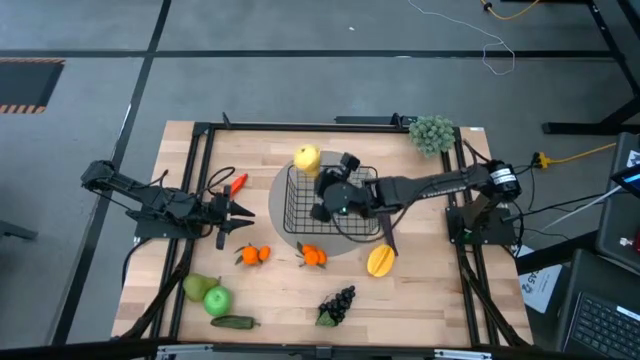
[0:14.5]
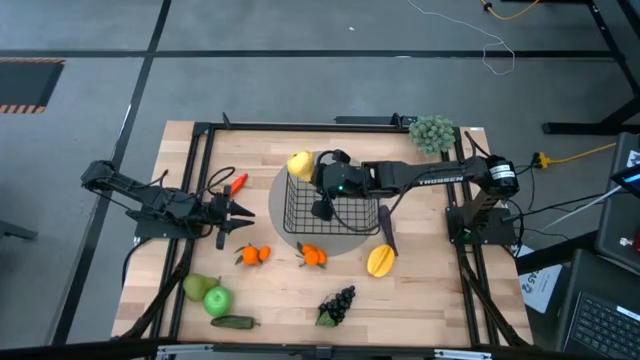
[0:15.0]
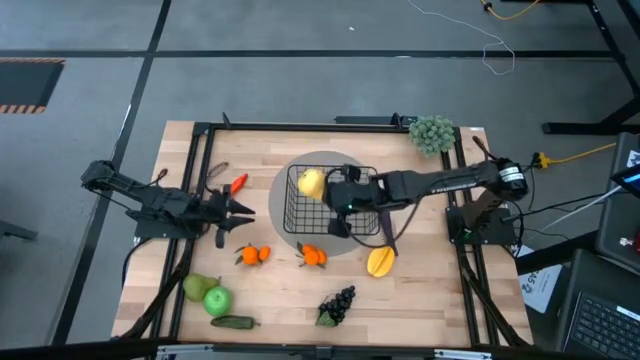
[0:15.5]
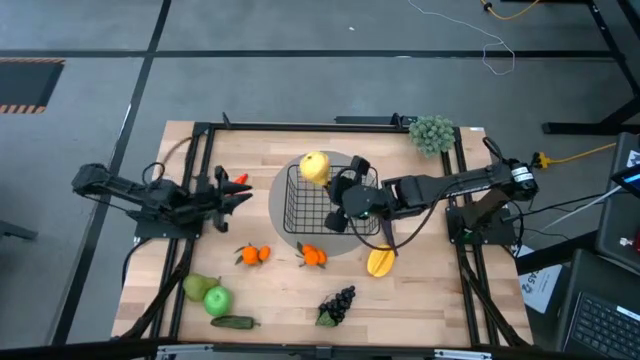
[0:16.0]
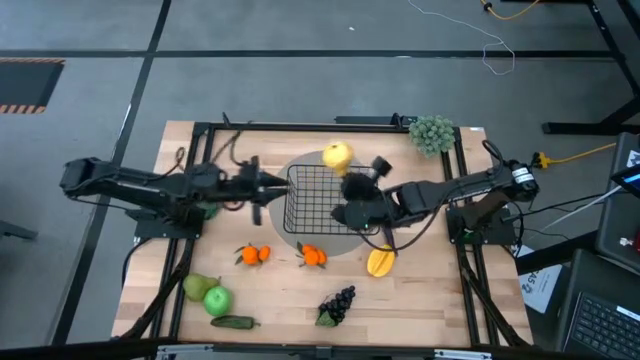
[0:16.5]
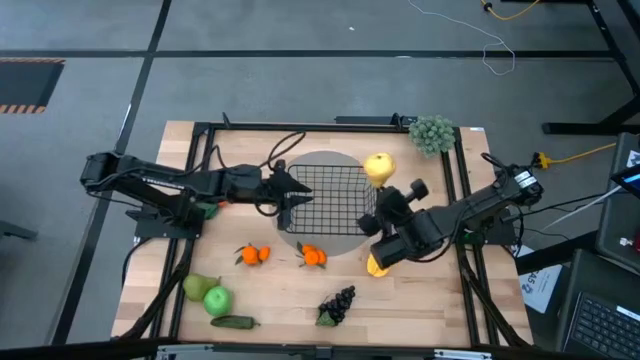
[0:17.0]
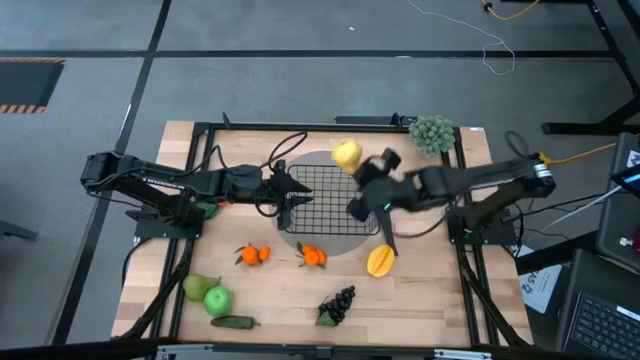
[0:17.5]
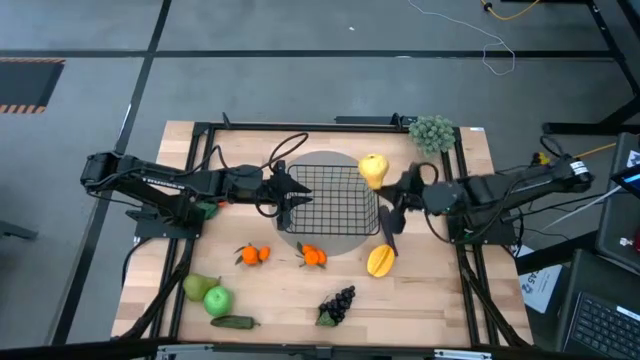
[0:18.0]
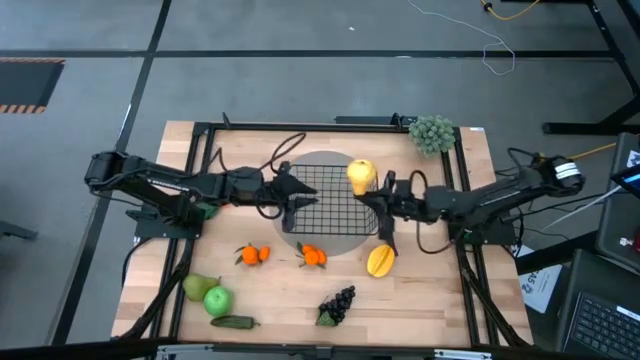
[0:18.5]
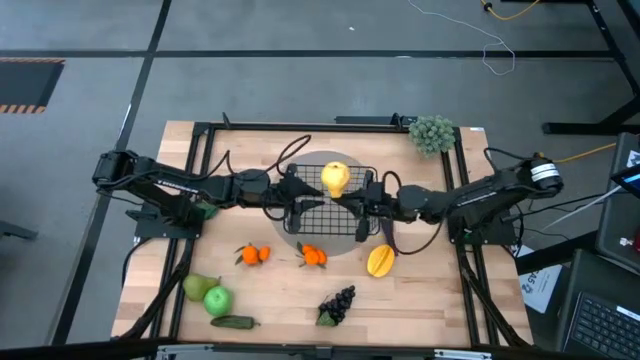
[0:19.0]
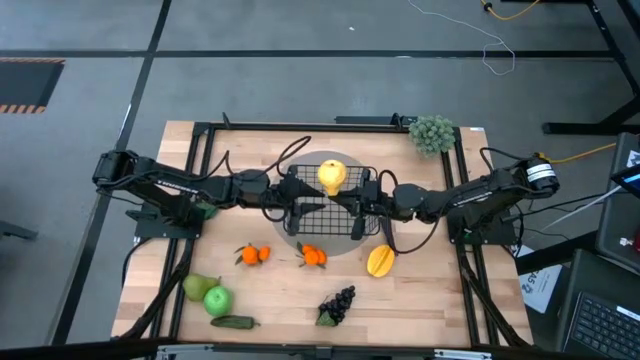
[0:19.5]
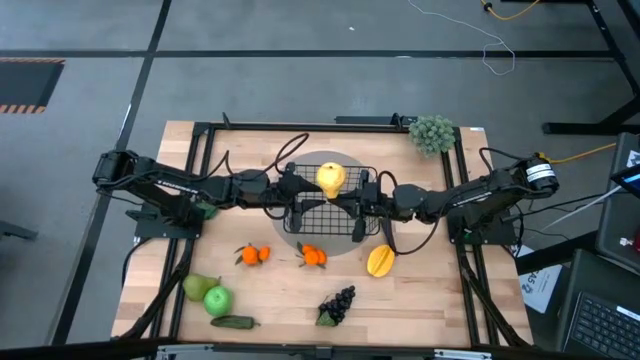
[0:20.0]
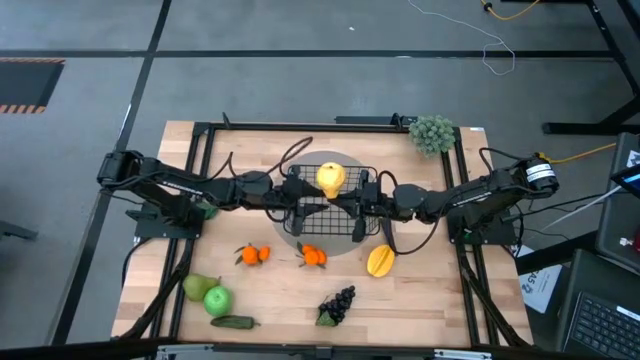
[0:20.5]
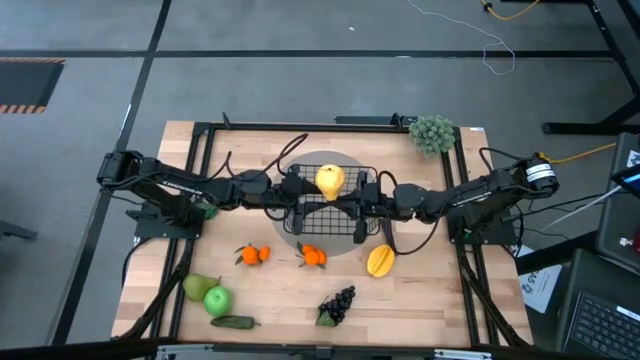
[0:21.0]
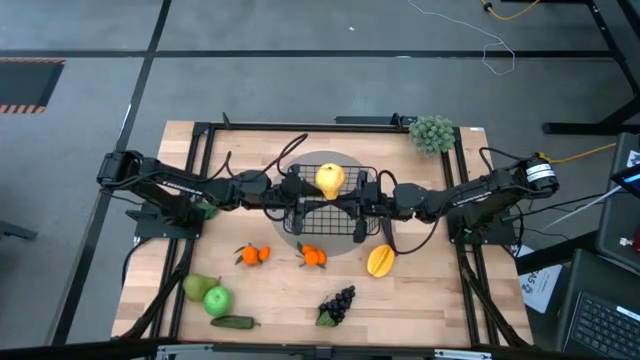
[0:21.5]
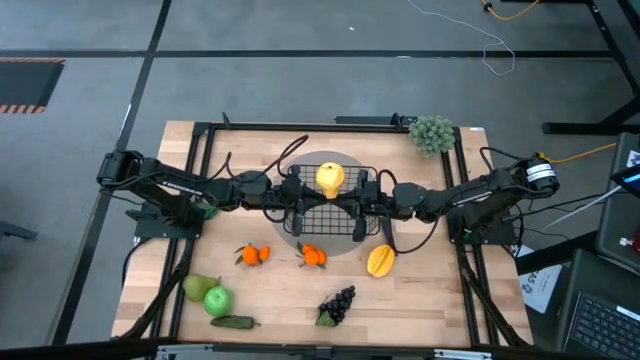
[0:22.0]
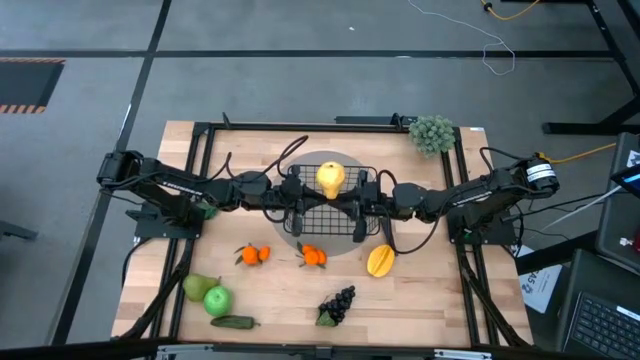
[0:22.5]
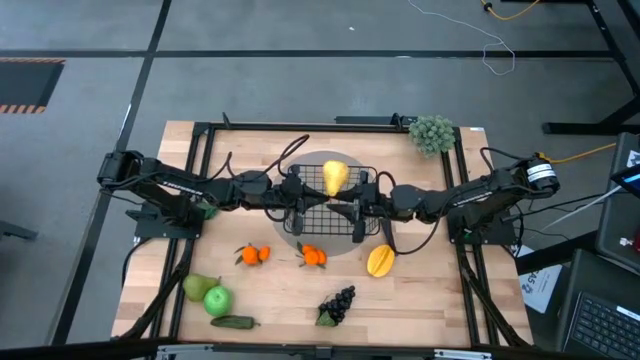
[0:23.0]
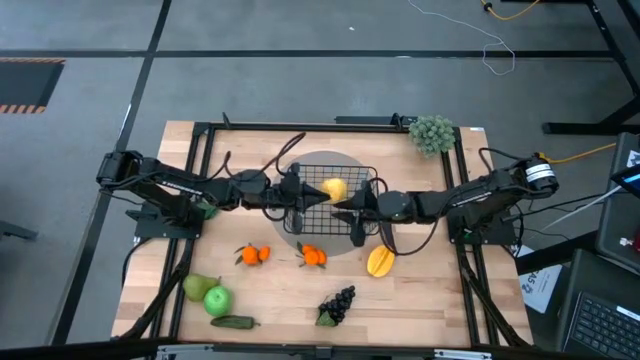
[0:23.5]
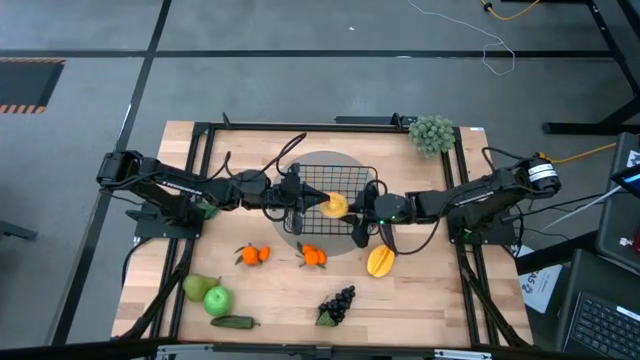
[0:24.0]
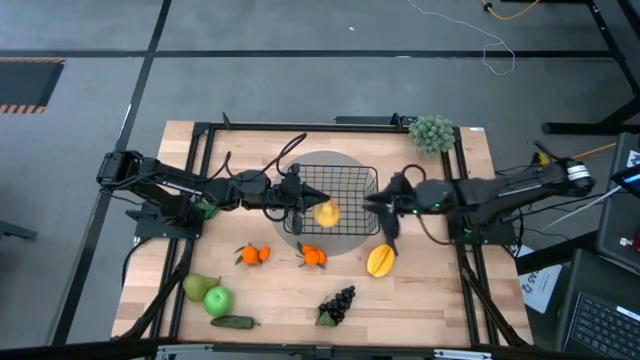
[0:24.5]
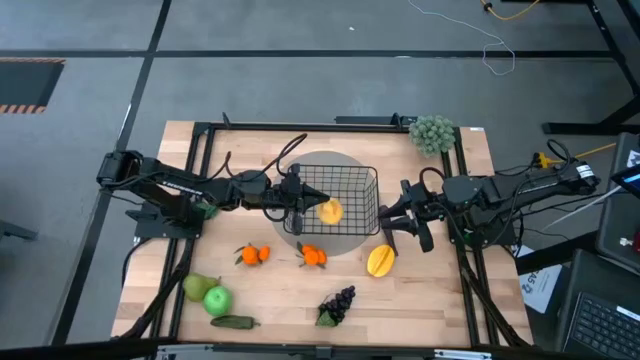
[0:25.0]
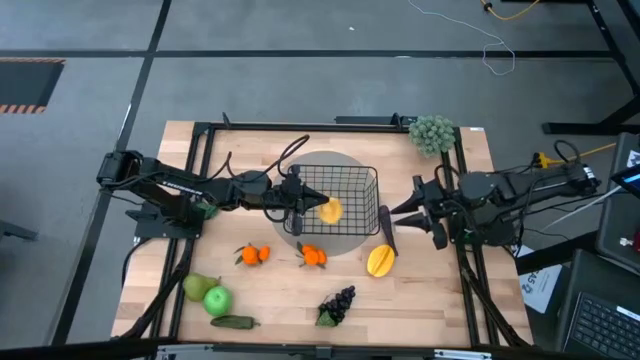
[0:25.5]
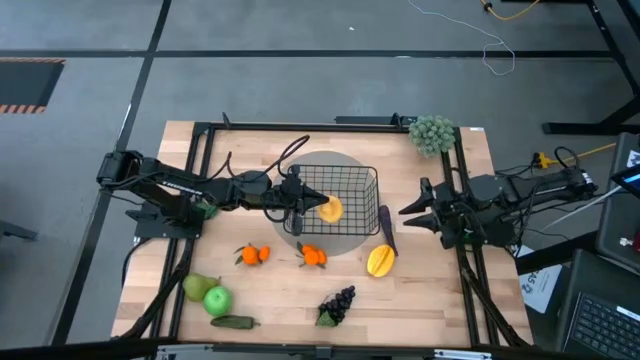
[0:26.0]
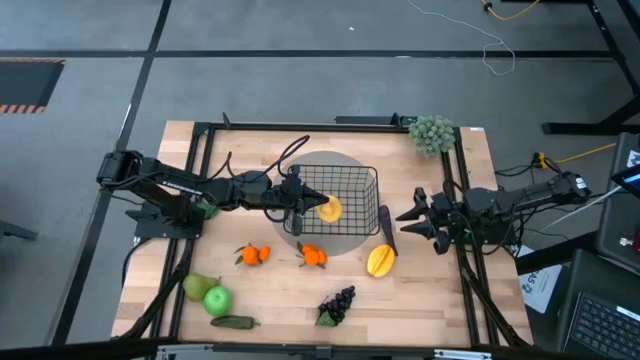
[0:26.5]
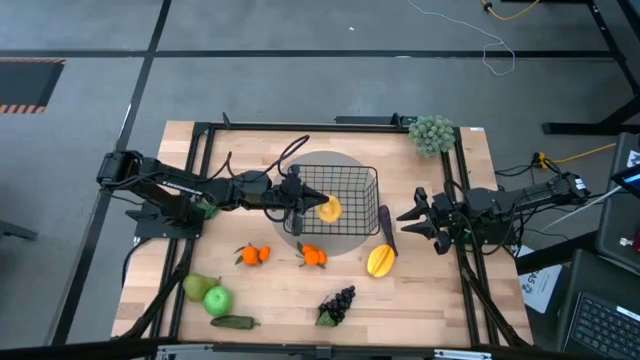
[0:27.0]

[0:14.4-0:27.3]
Task: Build produce basket
Put the yellow pear into the wire basket

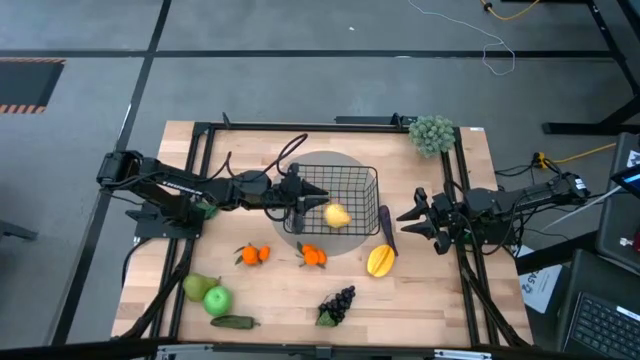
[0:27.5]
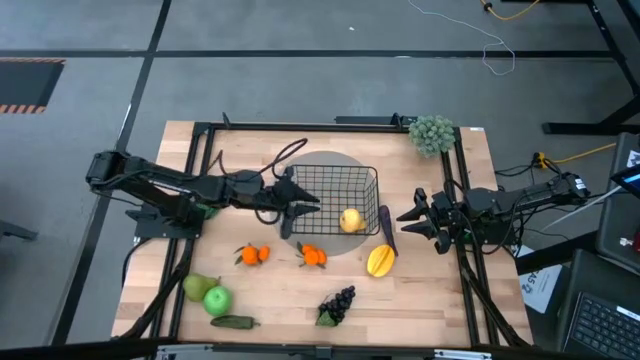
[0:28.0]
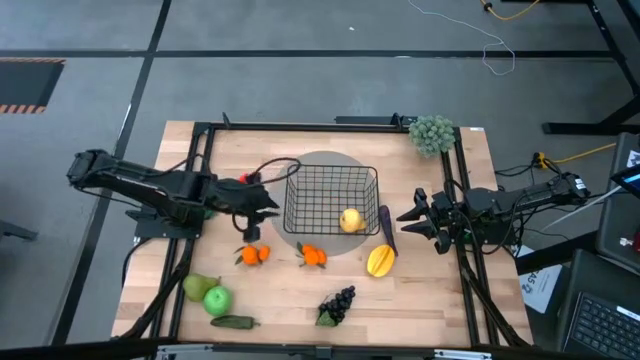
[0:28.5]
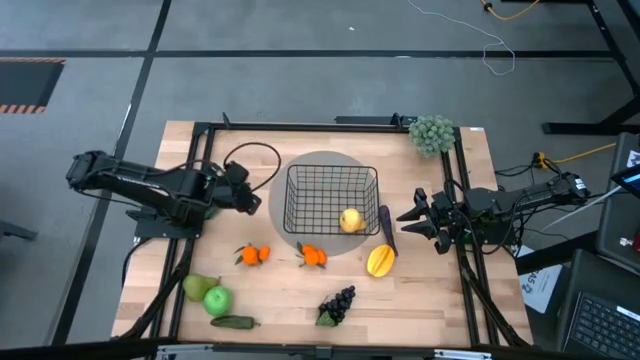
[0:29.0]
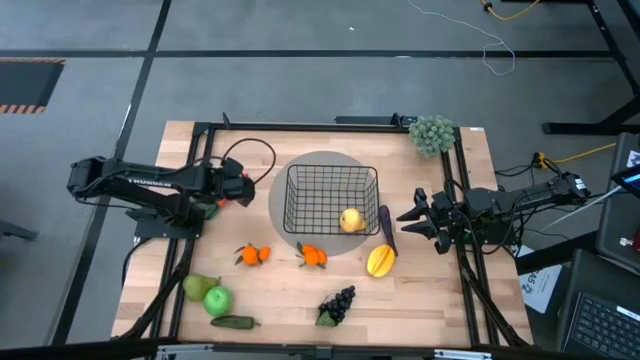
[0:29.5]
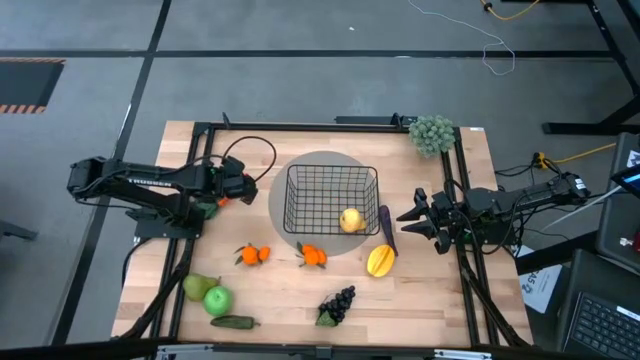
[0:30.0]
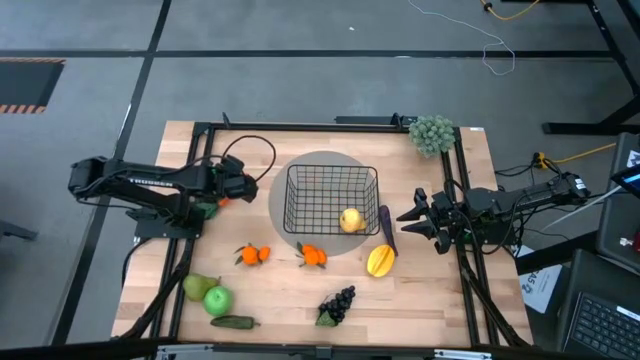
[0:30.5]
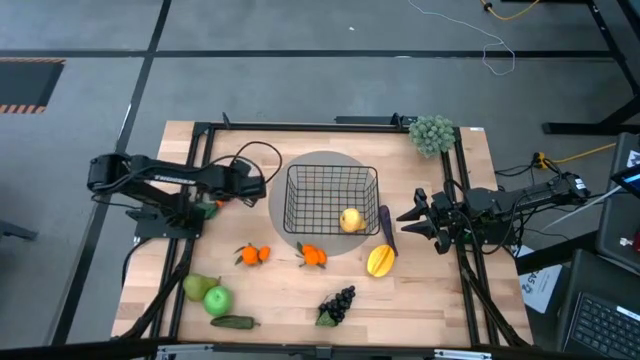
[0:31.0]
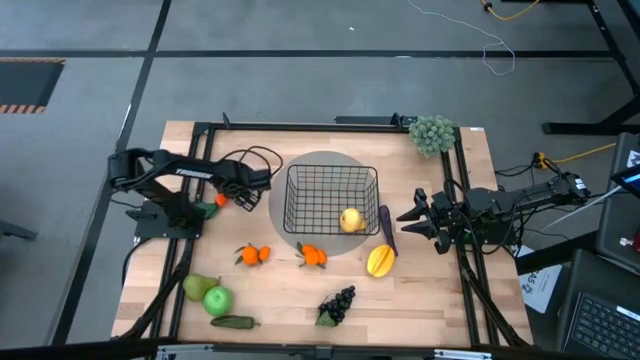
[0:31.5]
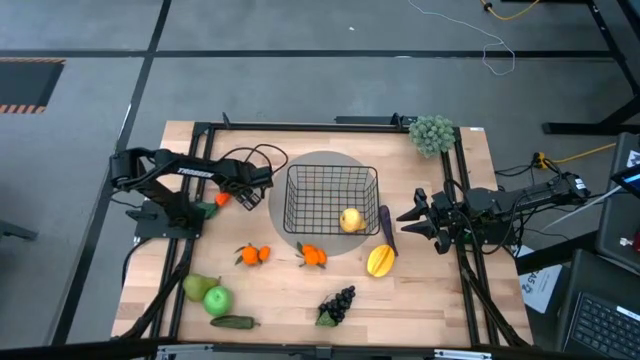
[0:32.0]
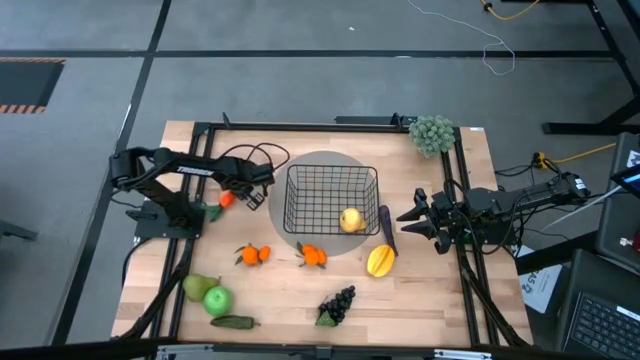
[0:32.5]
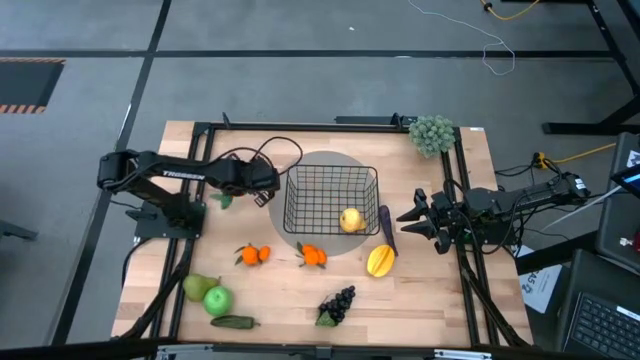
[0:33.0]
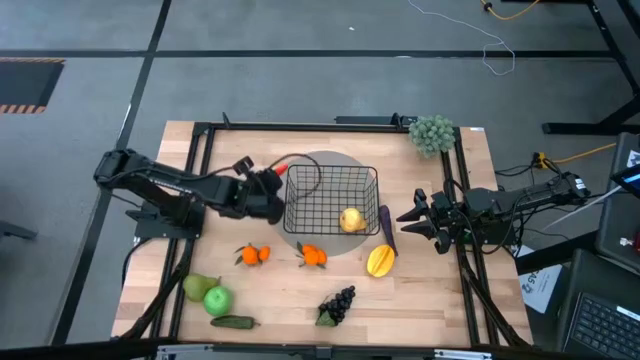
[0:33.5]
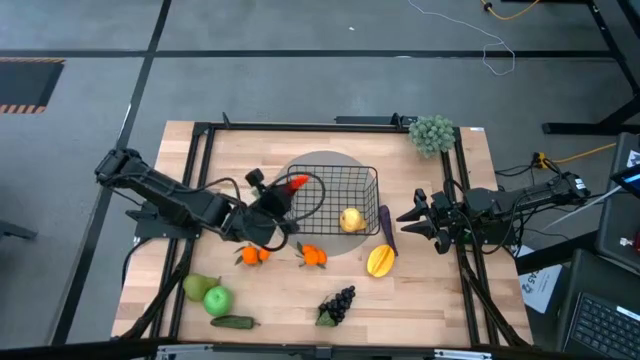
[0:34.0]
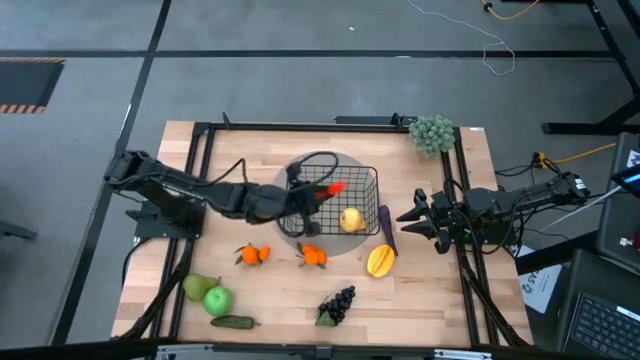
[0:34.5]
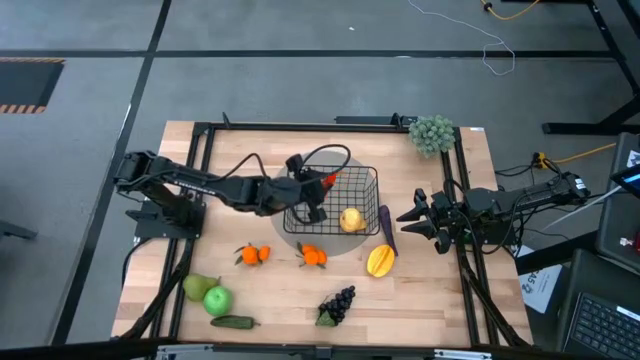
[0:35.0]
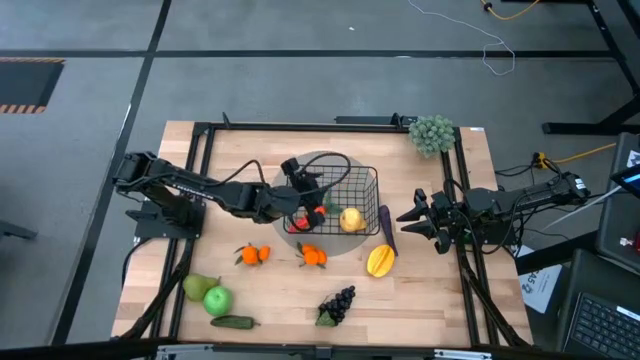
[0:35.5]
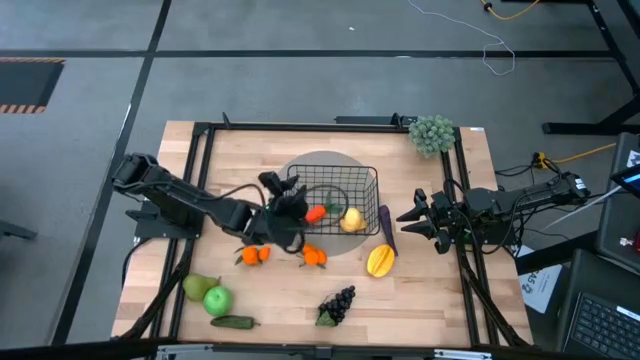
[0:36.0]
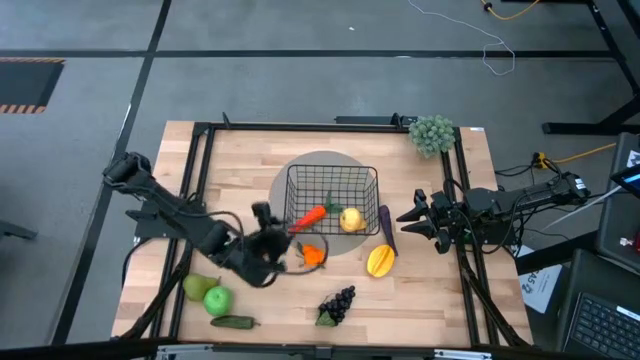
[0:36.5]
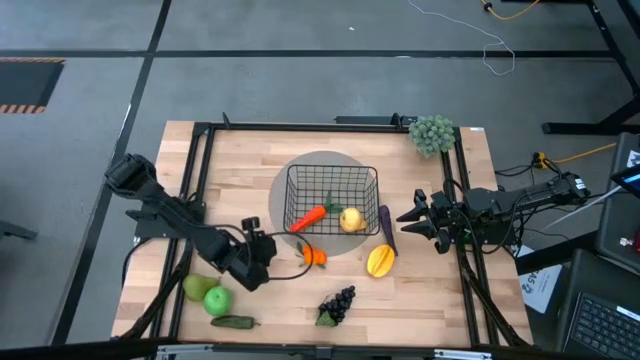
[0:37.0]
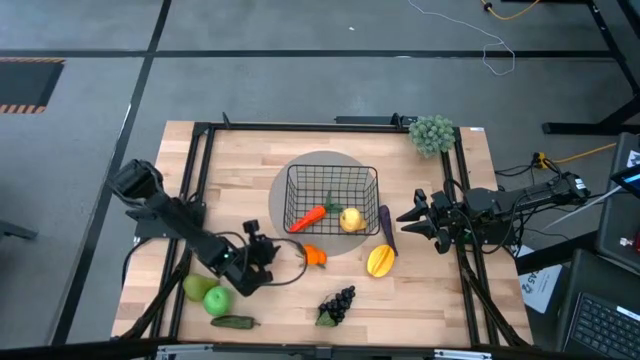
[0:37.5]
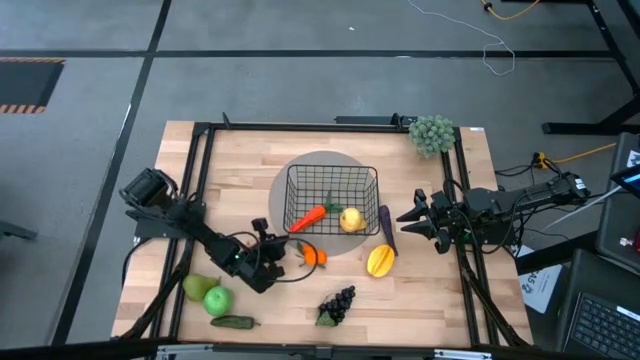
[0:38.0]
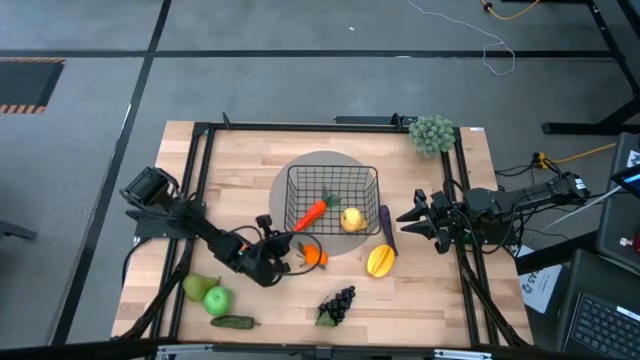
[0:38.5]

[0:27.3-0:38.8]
Put the orange carrot into the wire basket
